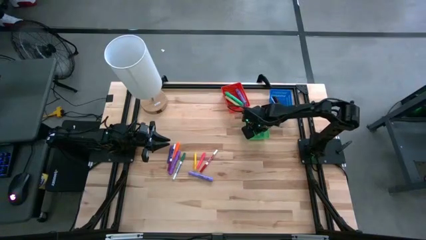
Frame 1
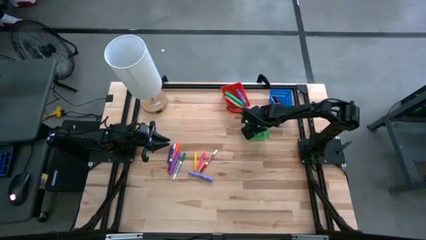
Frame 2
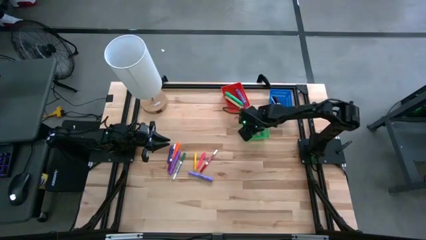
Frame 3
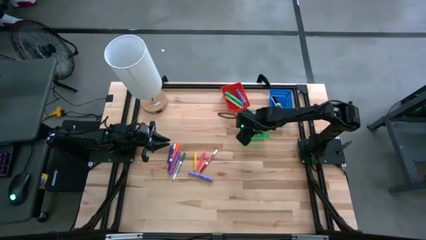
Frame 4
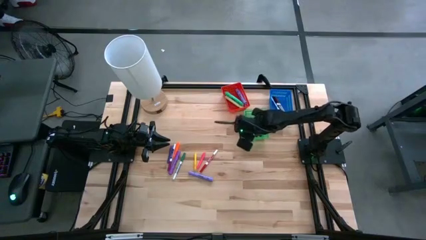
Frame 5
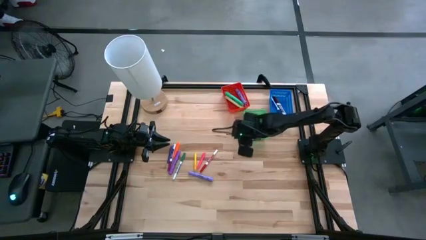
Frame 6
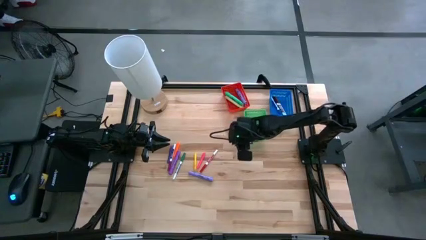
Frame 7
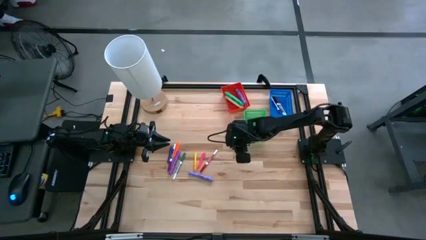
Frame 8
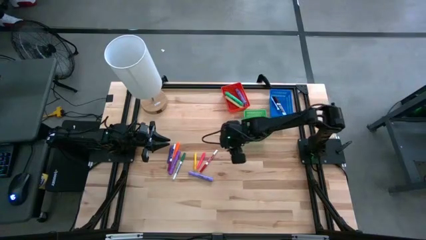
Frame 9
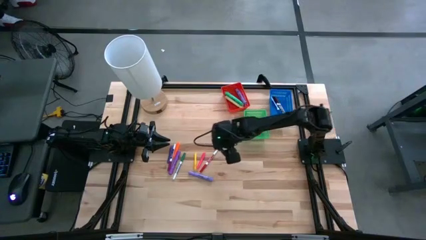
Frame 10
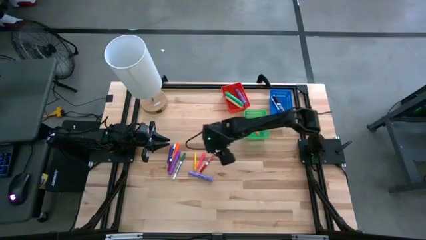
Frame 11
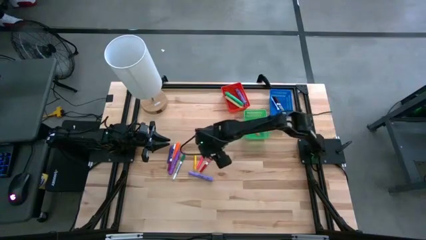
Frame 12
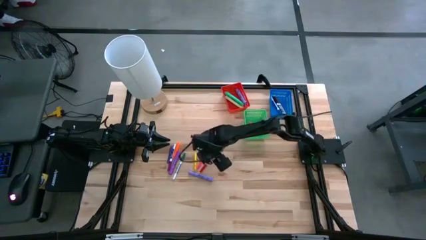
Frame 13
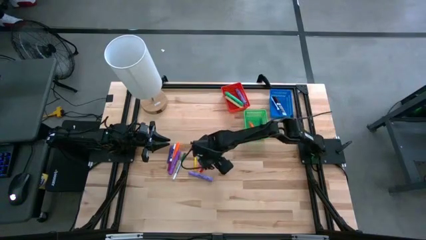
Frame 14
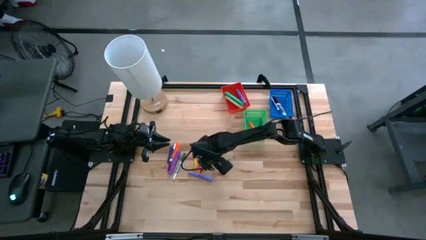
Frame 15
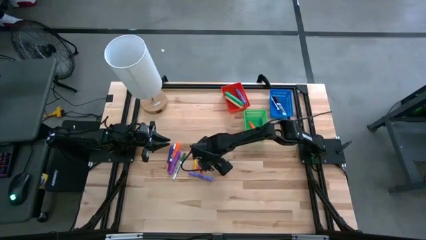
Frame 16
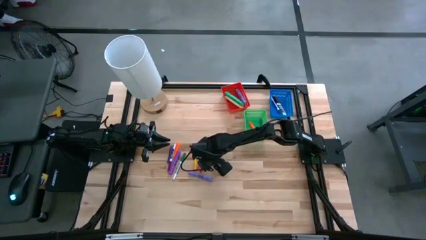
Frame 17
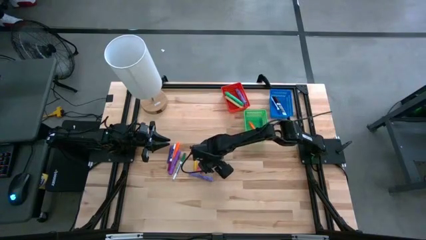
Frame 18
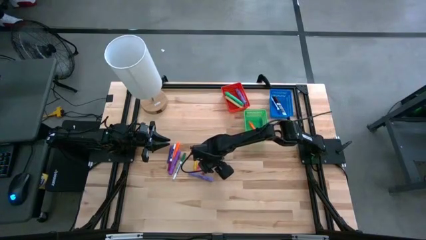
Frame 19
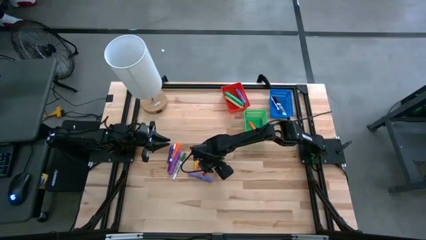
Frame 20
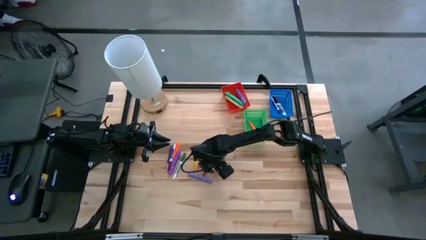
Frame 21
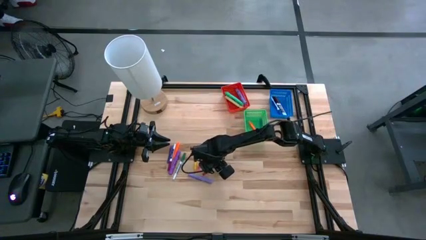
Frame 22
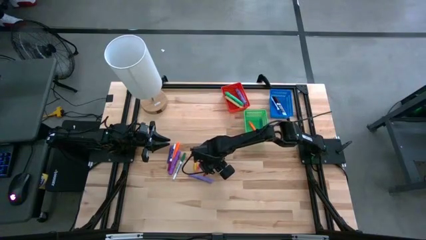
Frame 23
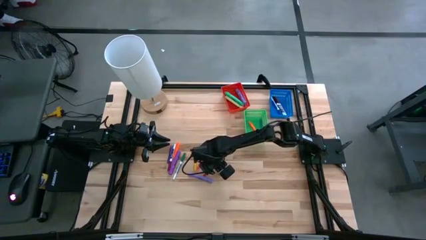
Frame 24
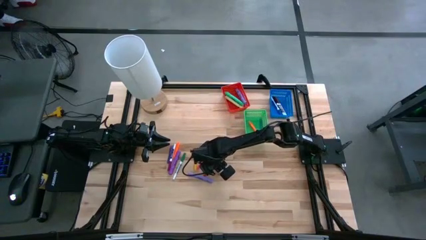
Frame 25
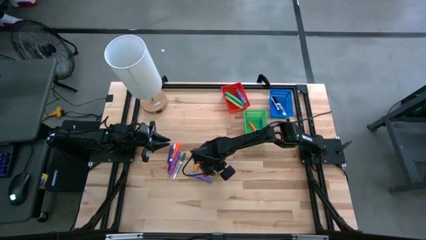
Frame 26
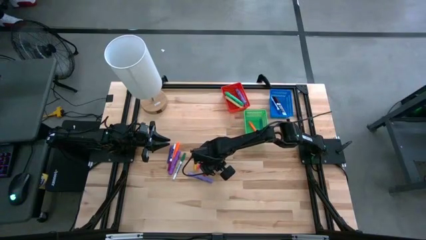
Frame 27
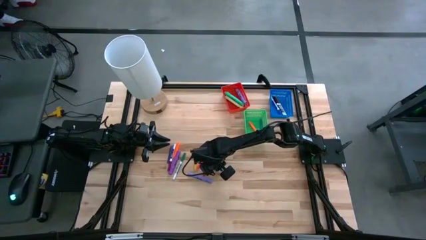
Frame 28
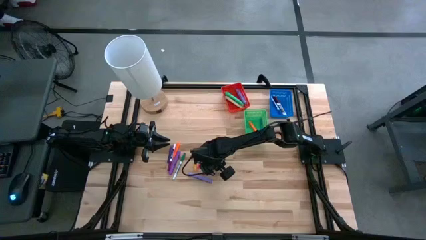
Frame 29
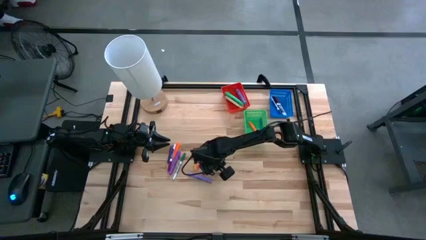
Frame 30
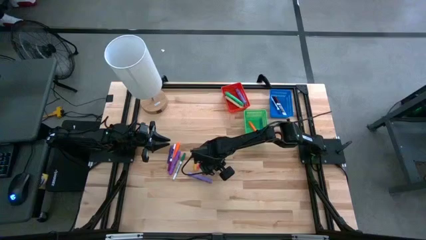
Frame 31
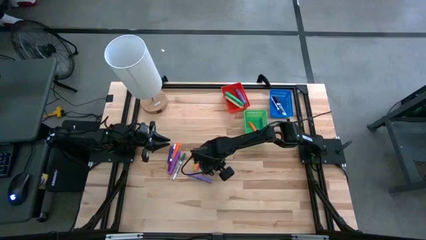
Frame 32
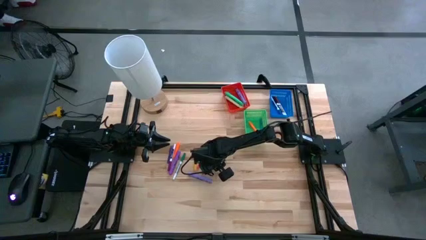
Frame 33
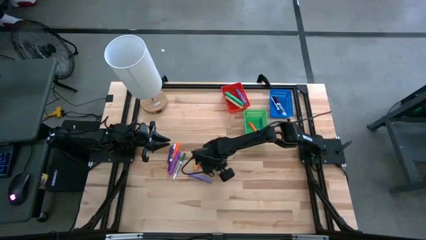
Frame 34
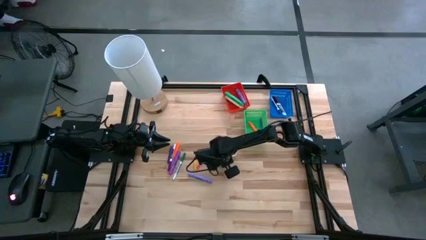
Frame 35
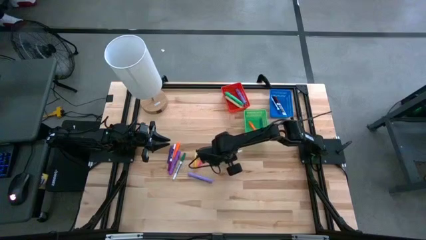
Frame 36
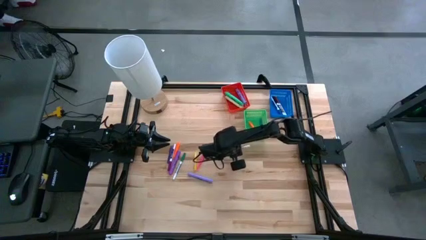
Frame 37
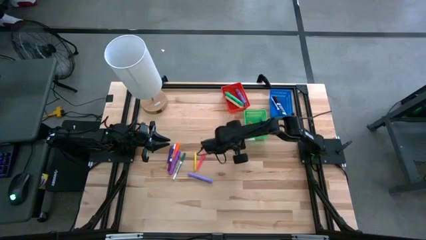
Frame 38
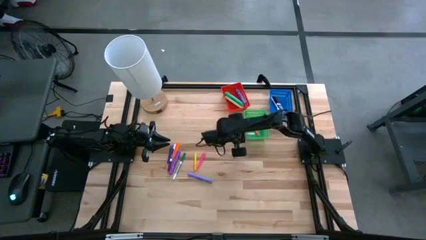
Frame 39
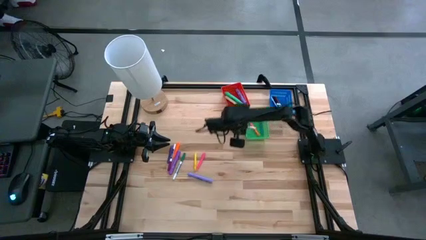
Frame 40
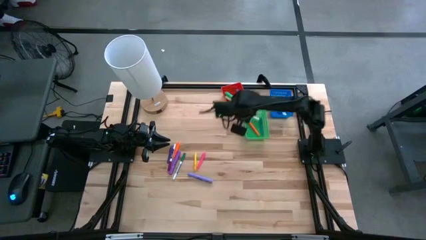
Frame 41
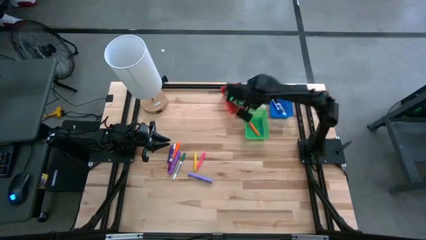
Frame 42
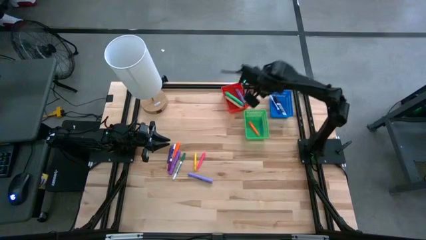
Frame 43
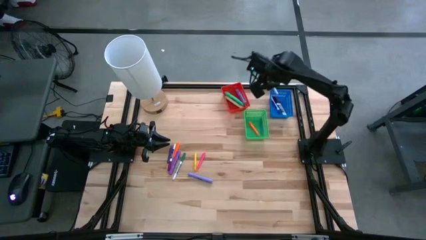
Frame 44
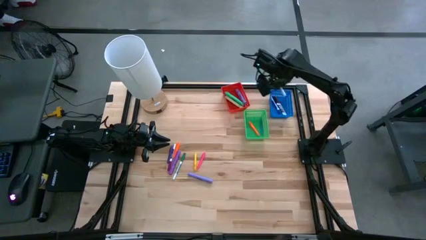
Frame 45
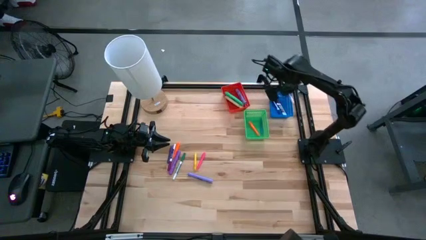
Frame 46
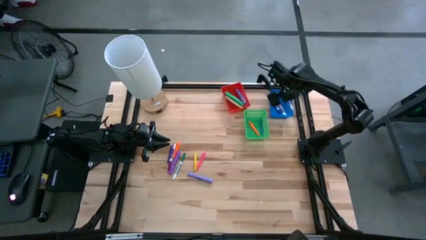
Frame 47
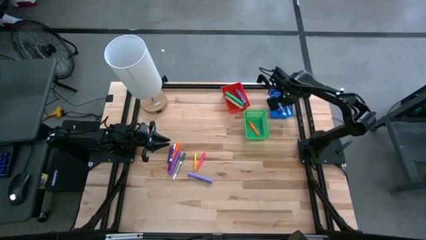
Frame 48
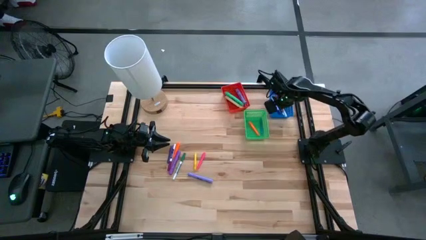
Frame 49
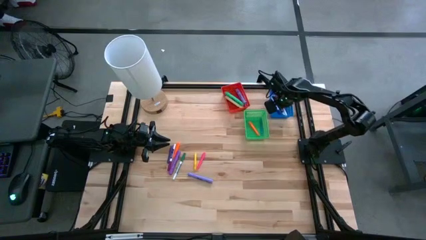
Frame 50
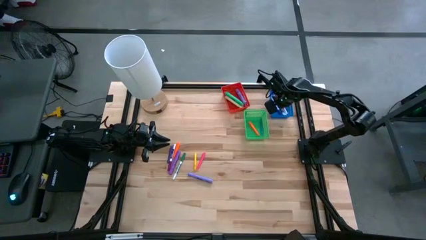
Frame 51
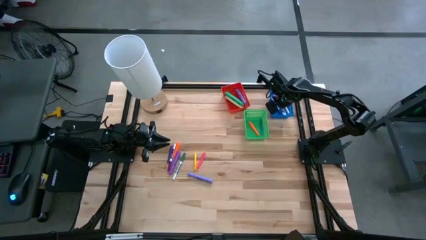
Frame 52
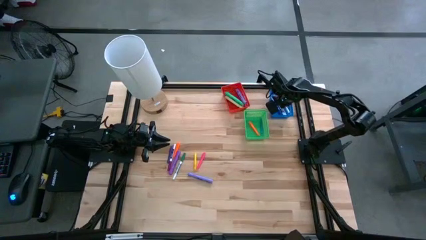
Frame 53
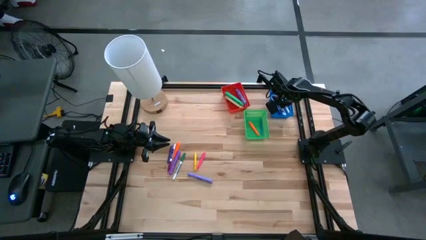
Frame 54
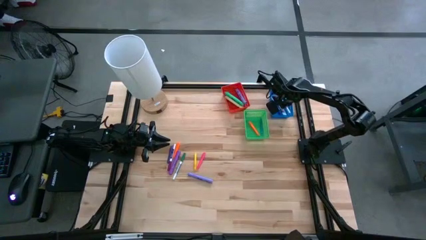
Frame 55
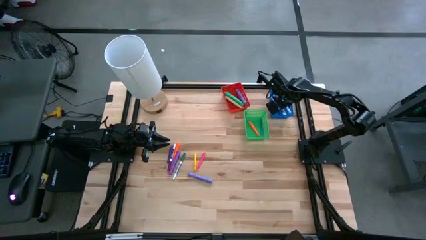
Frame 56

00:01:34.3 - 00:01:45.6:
Task: Pick & Place Markers
Put the red marker in the blue bin
